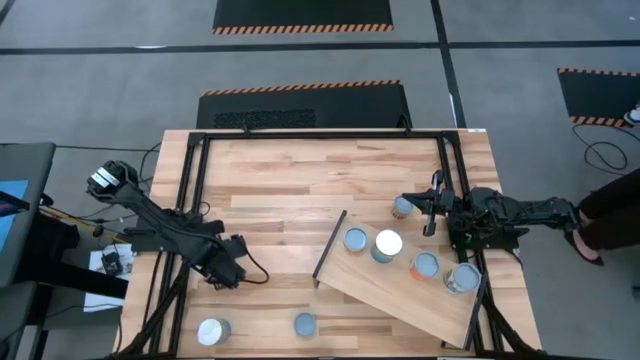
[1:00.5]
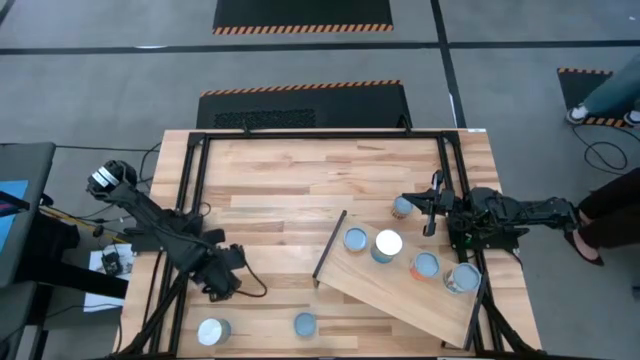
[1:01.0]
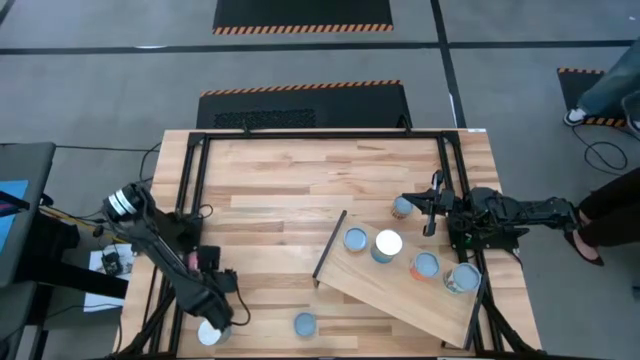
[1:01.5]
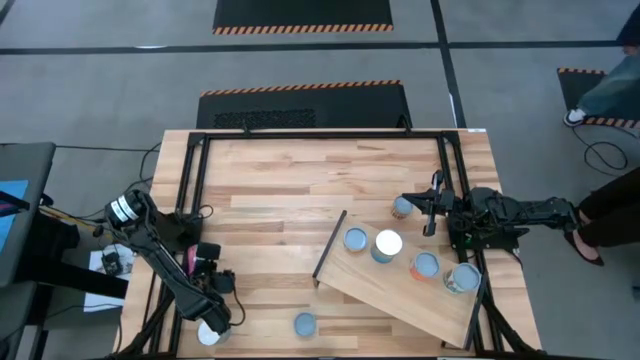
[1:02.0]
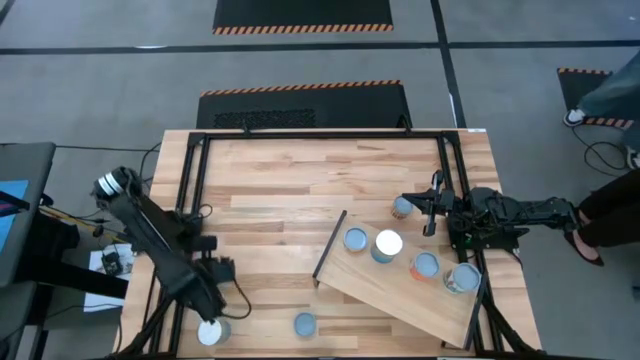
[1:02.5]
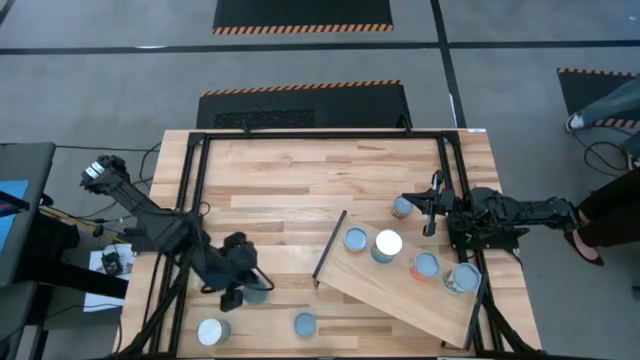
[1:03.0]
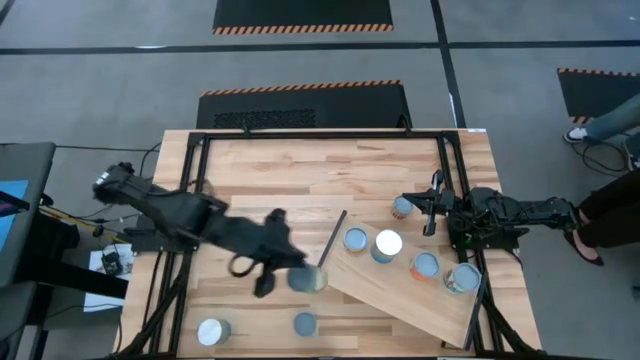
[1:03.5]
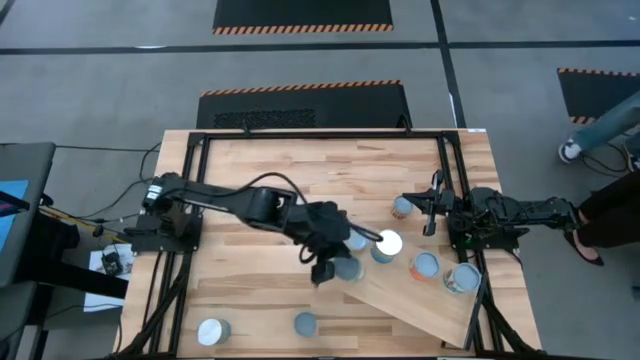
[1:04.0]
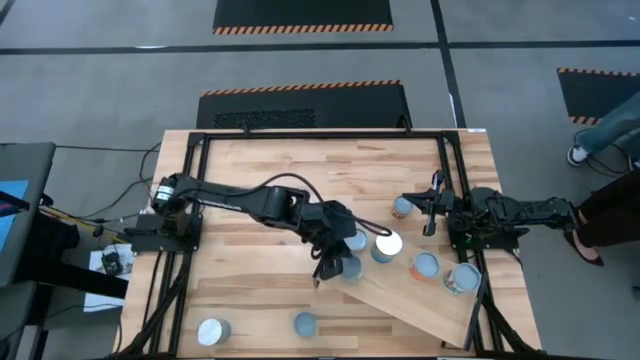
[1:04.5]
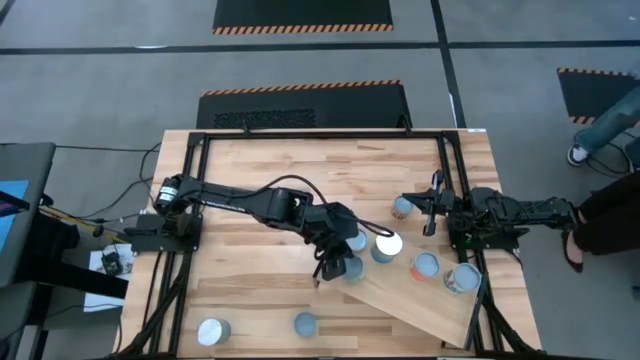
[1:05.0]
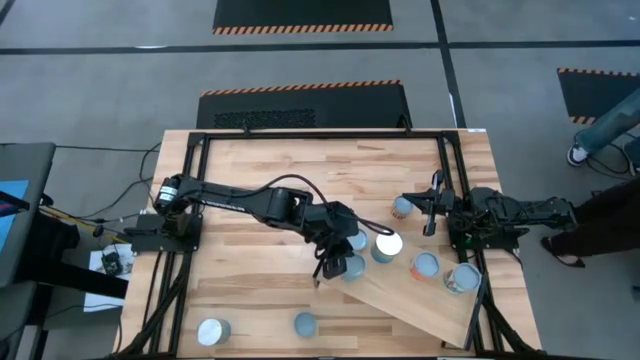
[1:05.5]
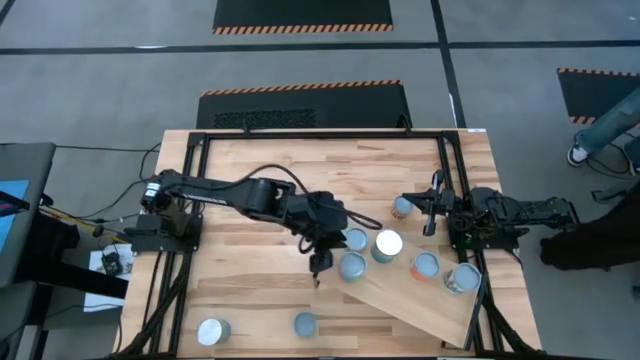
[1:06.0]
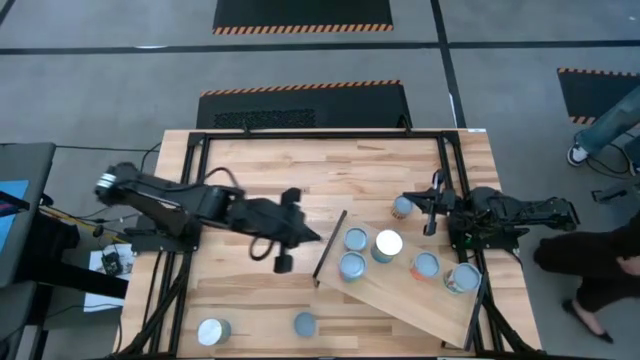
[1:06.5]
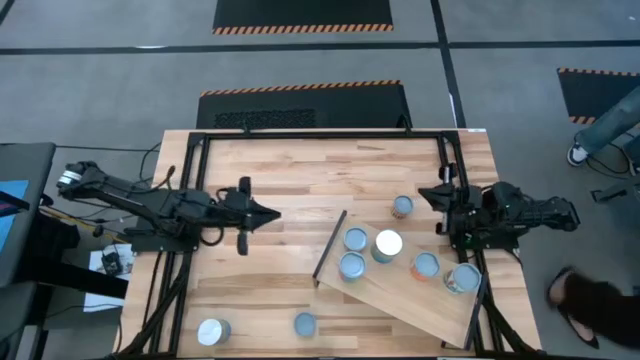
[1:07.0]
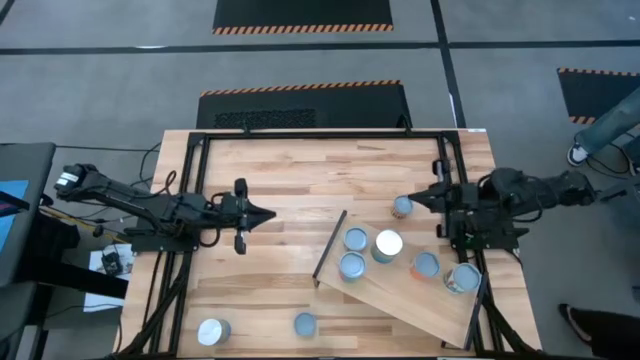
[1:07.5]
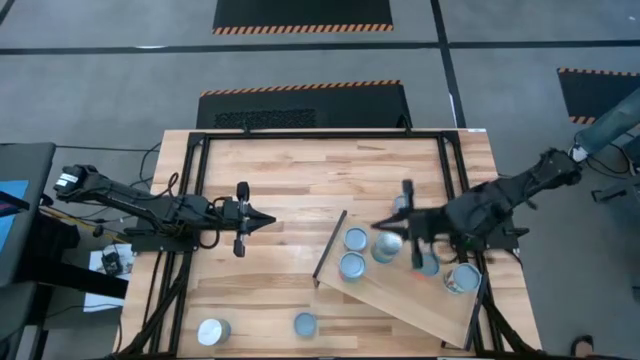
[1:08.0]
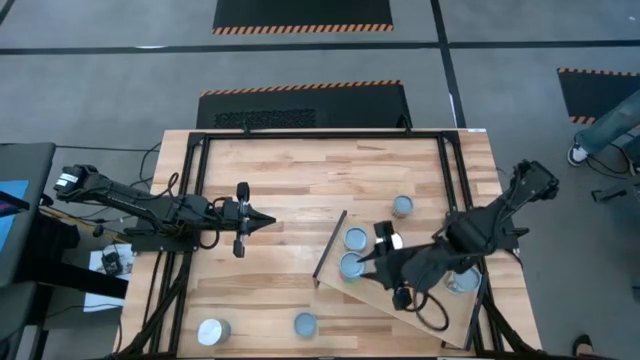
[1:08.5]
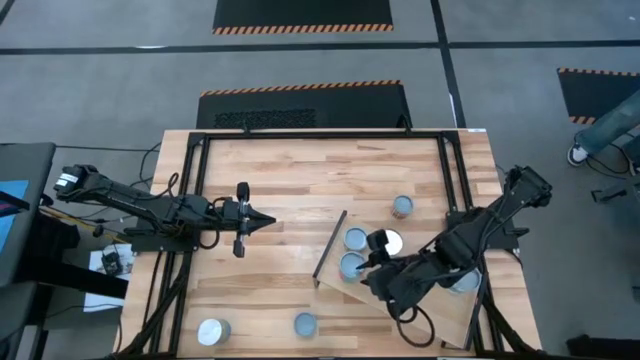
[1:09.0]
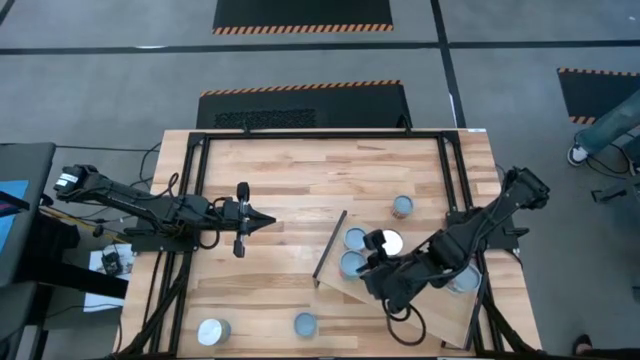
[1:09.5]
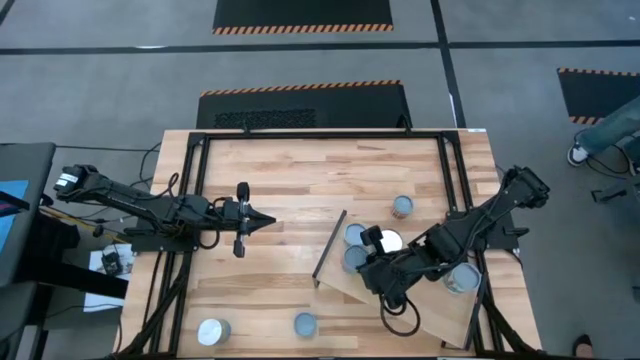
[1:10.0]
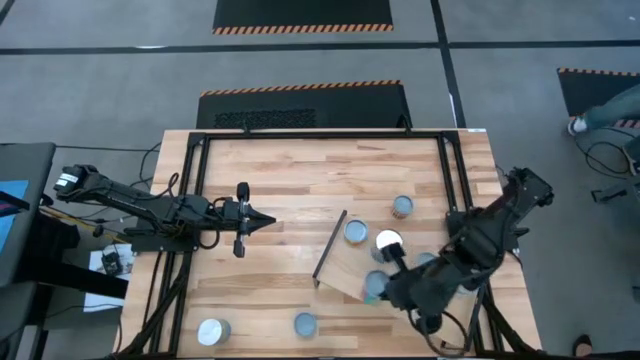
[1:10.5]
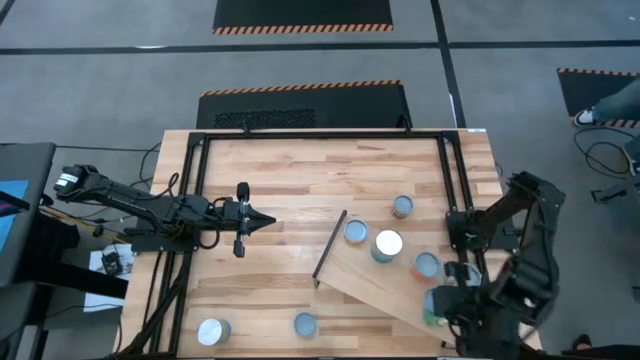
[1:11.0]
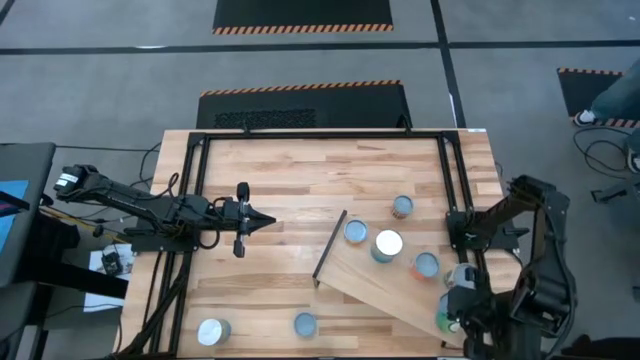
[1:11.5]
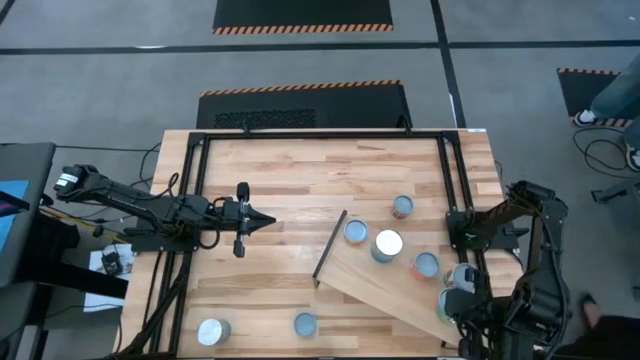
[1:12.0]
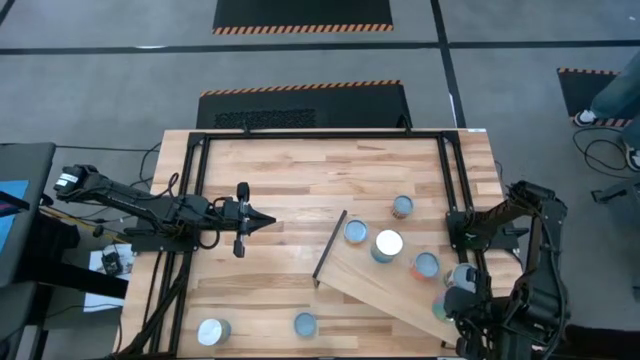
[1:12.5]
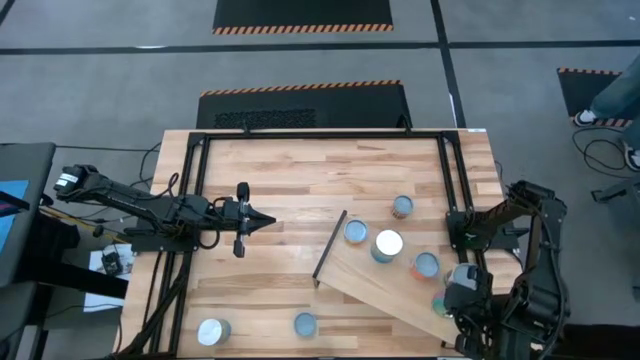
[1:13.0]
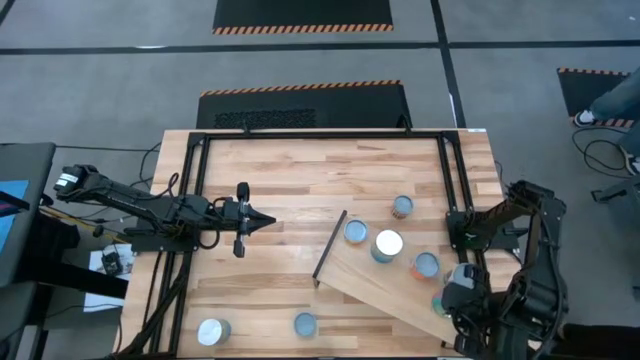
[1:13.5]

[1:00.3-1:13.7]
Task: Pick and place cans onto a shelf
Put the canned chicken soup on the shelf

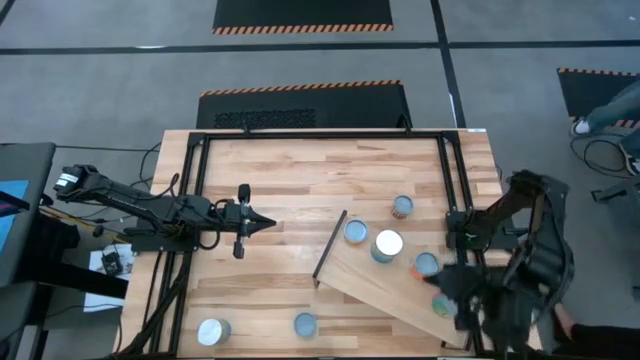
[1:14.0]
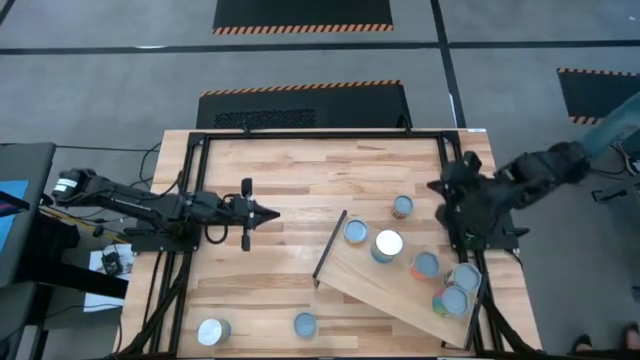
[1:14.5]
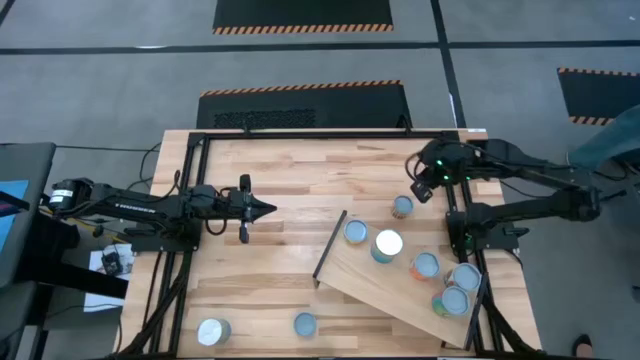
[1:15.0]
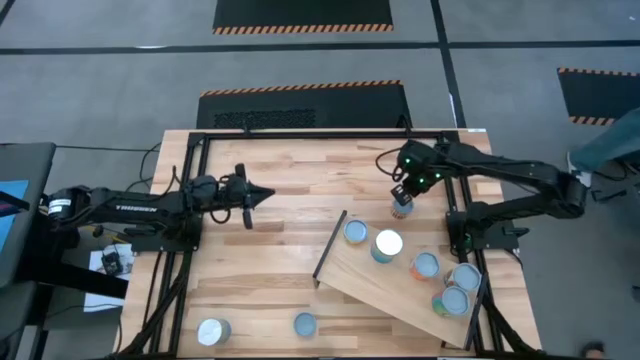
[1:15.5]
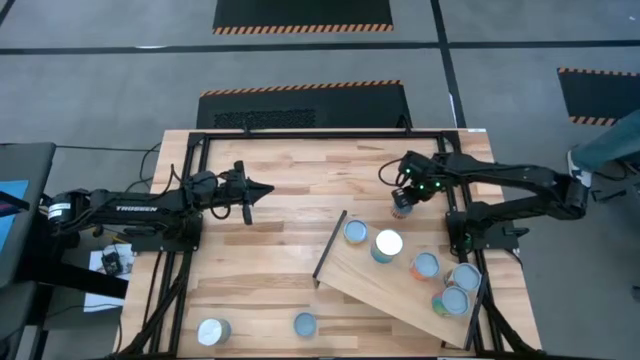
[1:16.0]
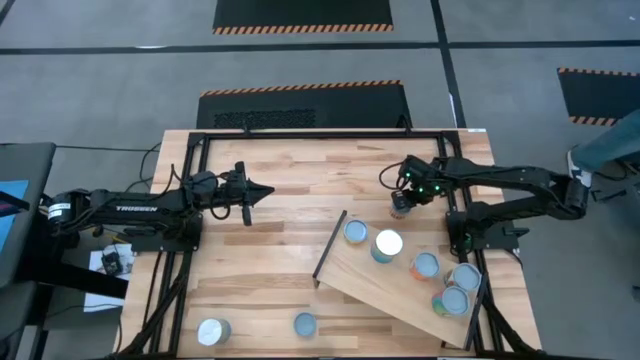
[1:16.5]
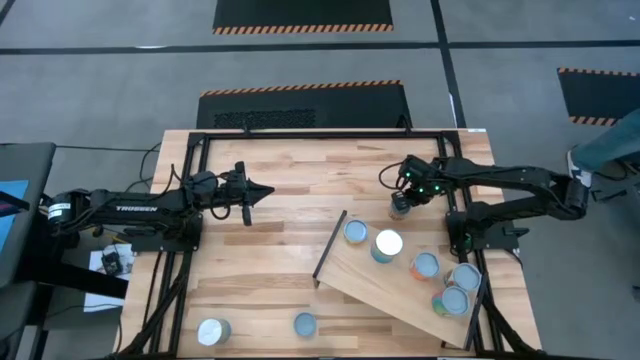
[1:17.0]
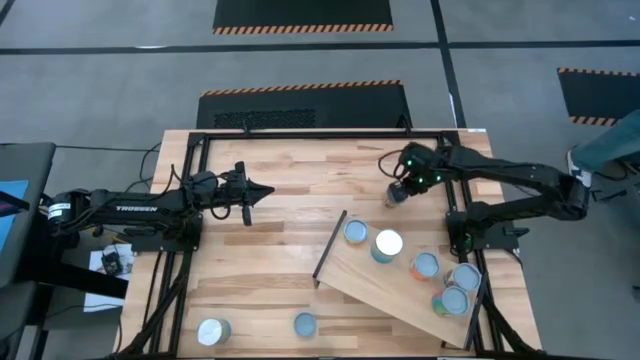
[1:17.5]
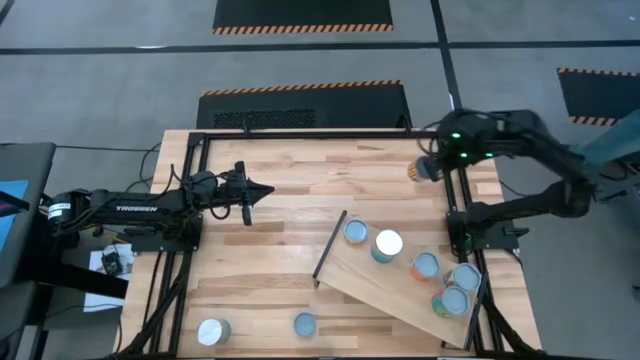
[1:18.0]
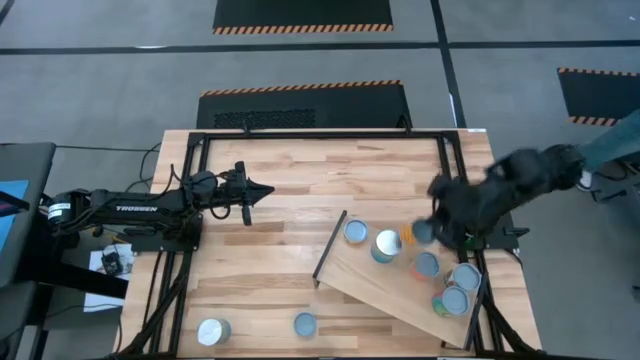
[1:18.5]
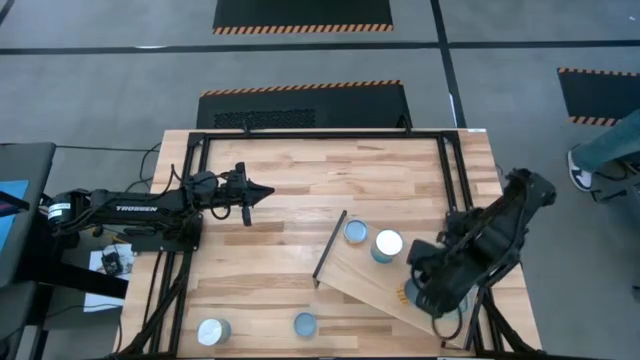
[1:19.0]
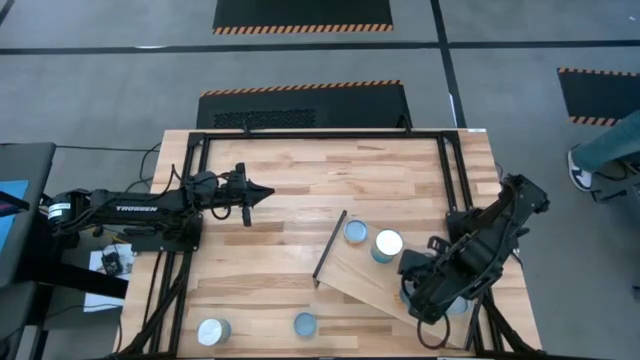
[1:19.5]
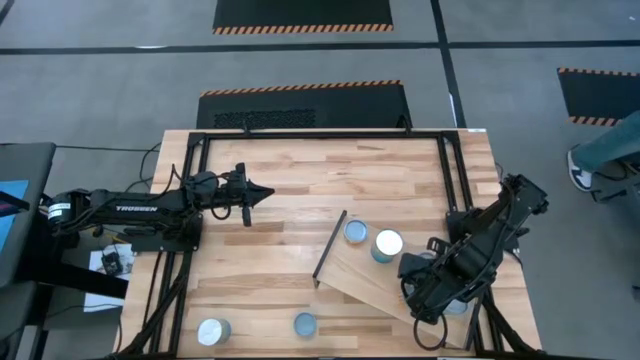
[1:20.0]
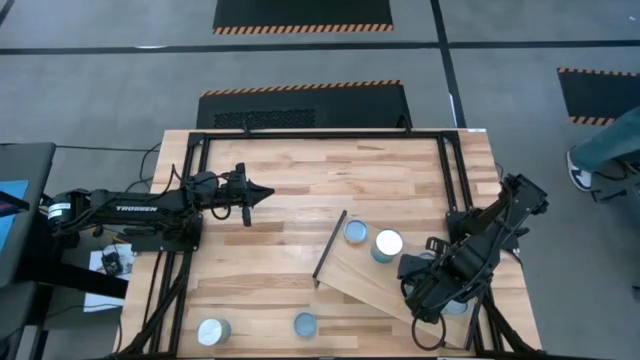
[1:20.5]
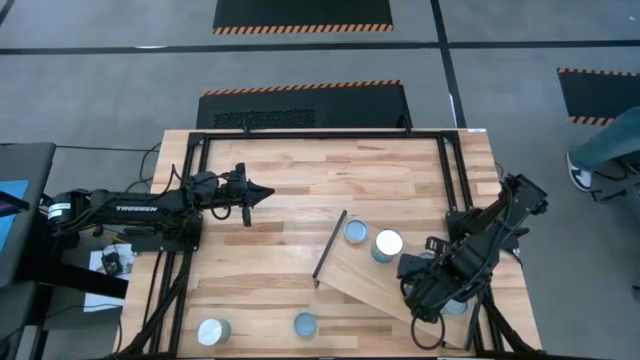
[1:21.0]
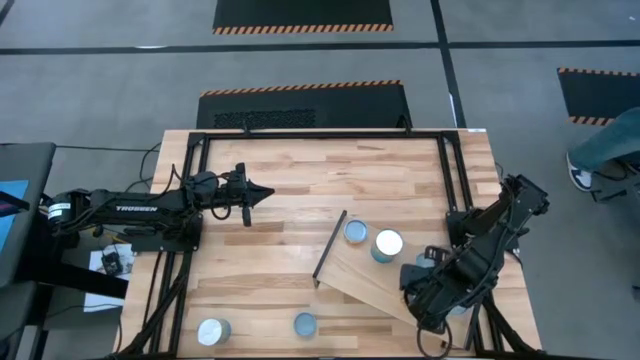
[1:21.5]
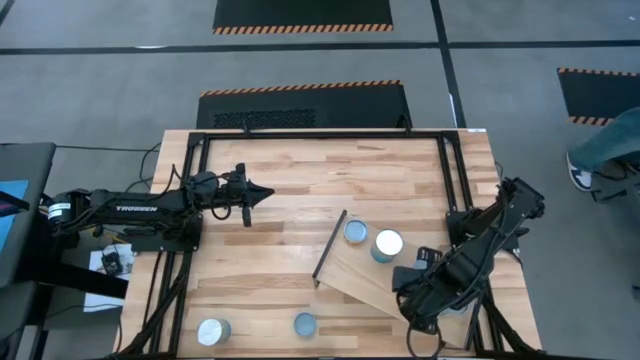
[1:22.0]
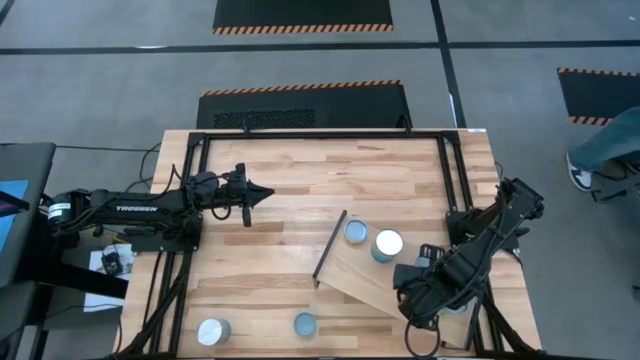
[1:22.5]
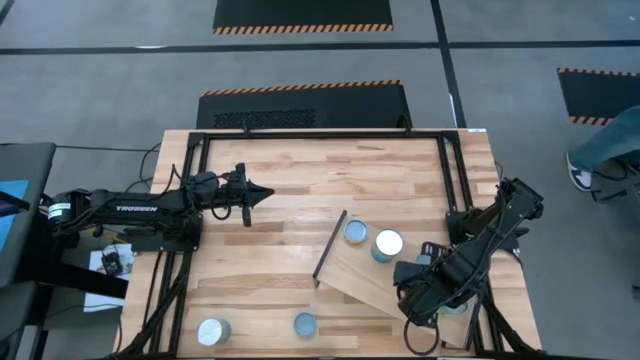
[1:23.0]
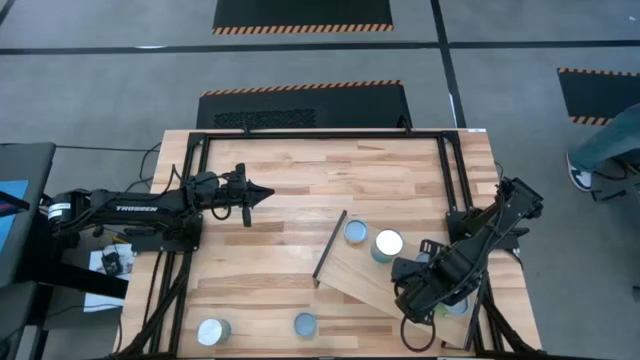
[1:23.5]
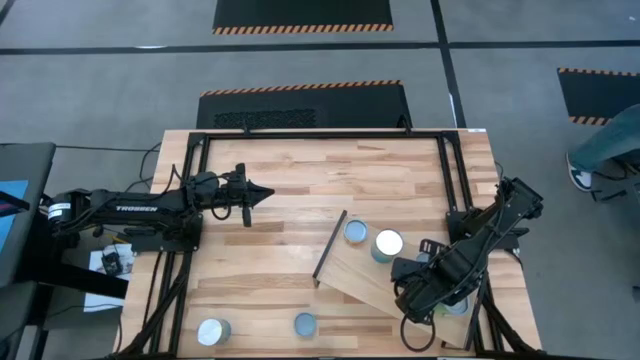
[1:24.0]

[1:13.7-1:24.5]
Put the canned beans on the shelf
